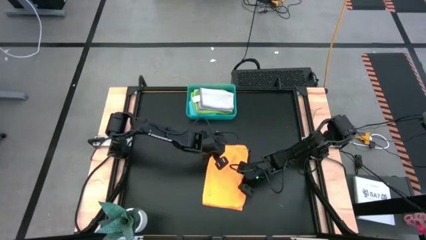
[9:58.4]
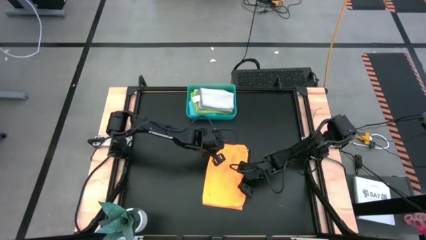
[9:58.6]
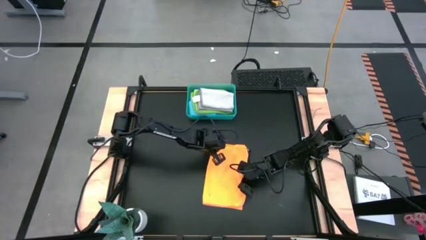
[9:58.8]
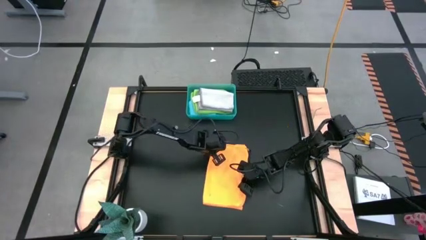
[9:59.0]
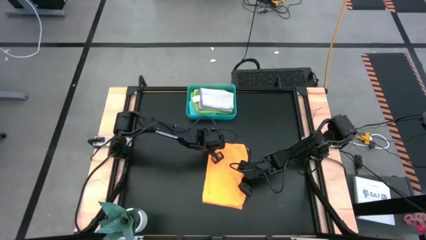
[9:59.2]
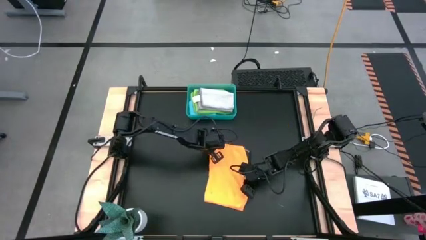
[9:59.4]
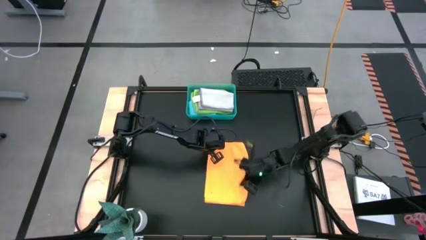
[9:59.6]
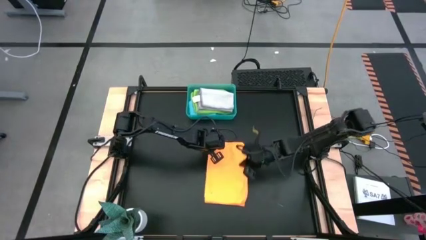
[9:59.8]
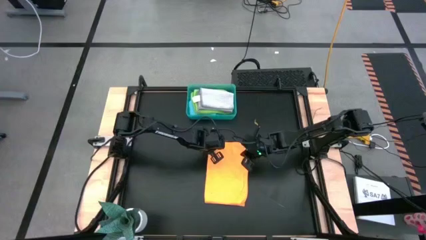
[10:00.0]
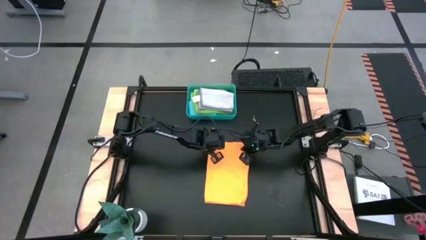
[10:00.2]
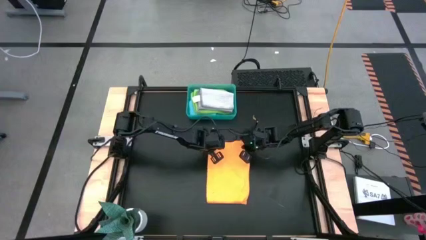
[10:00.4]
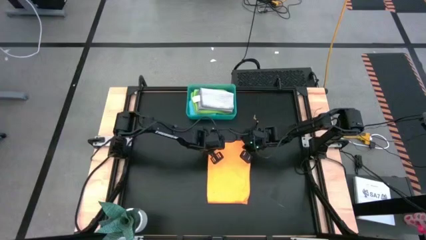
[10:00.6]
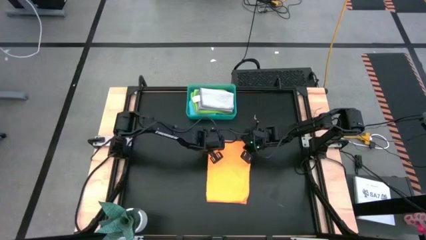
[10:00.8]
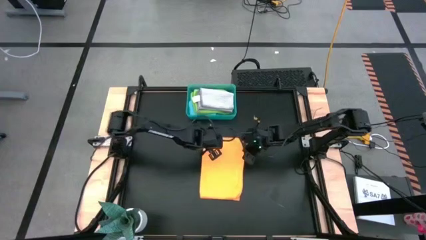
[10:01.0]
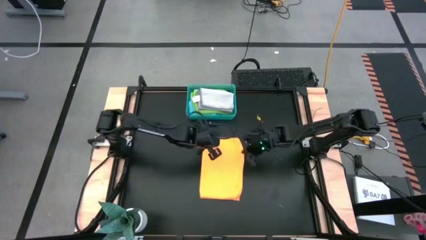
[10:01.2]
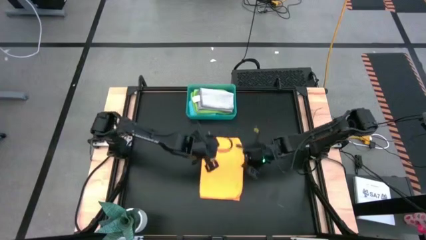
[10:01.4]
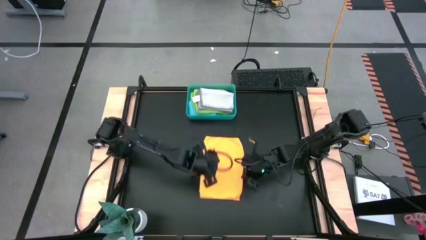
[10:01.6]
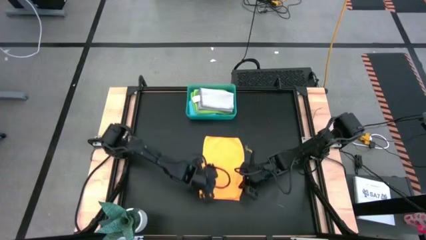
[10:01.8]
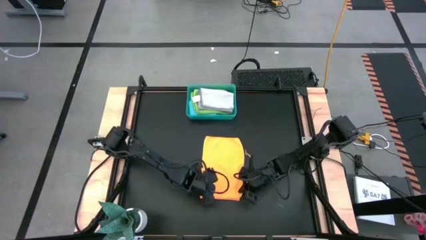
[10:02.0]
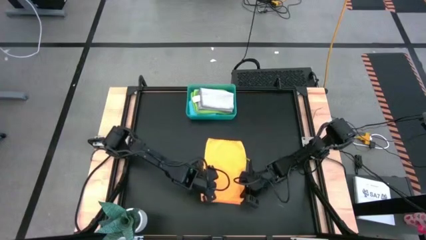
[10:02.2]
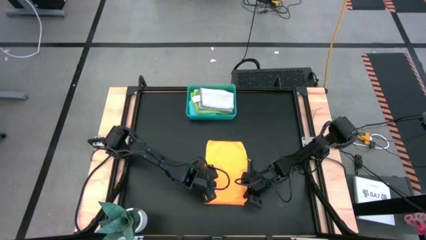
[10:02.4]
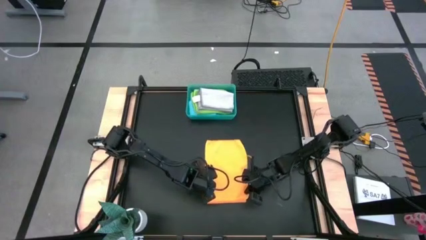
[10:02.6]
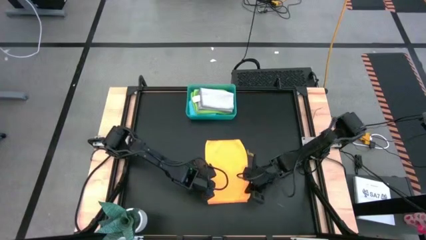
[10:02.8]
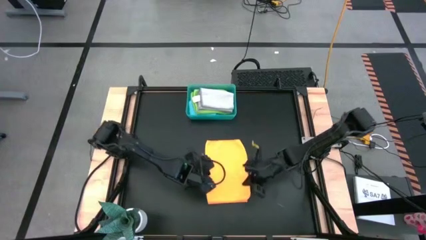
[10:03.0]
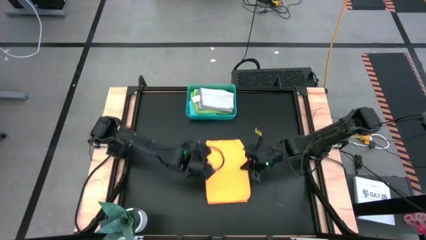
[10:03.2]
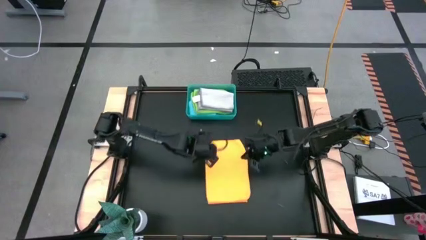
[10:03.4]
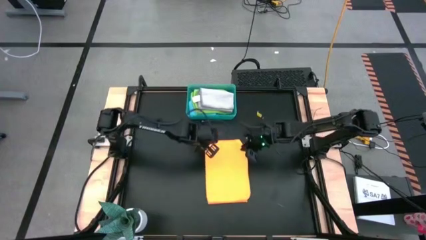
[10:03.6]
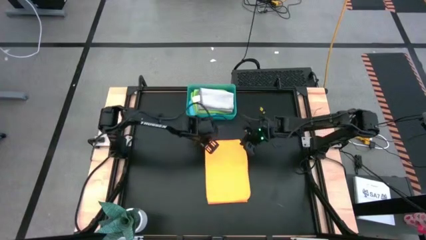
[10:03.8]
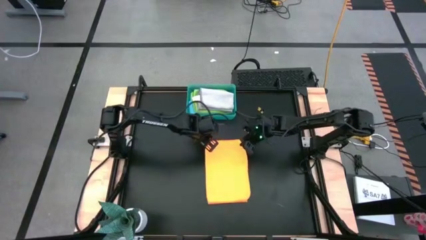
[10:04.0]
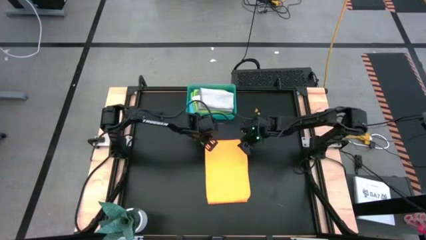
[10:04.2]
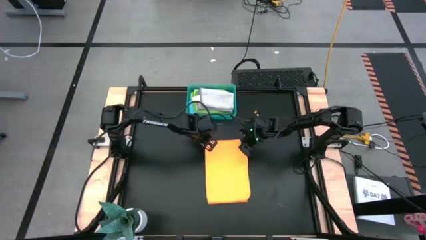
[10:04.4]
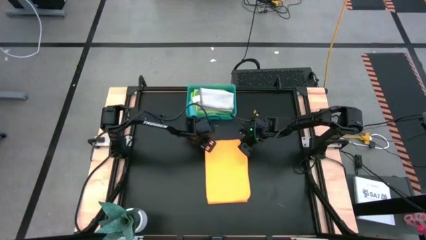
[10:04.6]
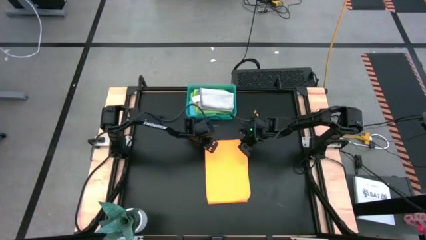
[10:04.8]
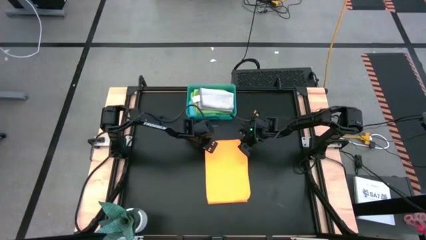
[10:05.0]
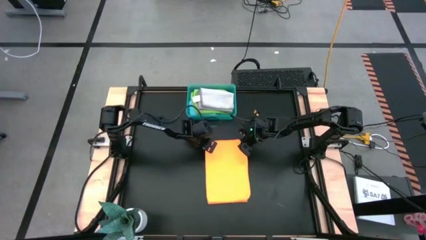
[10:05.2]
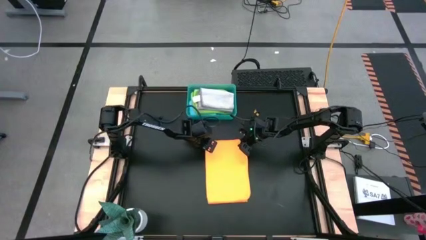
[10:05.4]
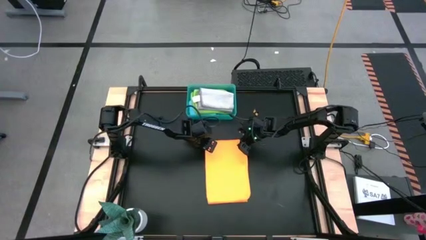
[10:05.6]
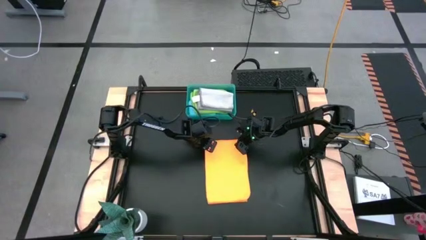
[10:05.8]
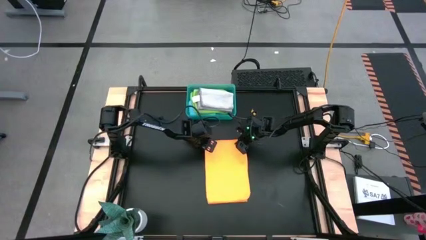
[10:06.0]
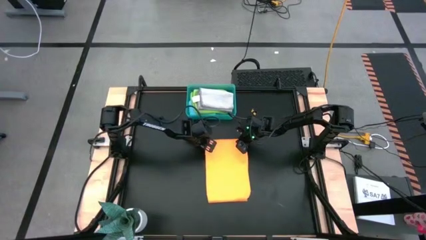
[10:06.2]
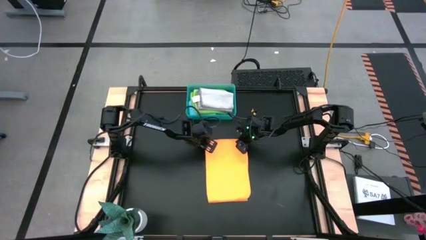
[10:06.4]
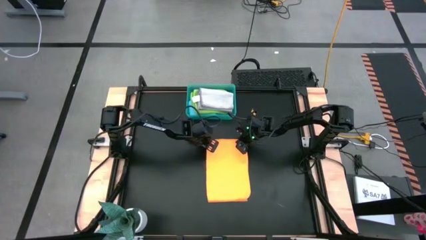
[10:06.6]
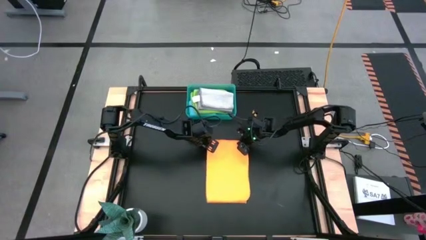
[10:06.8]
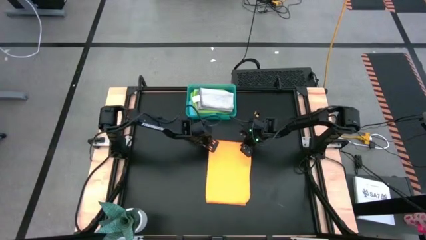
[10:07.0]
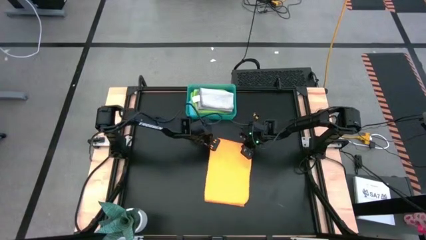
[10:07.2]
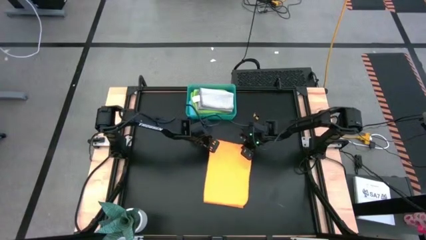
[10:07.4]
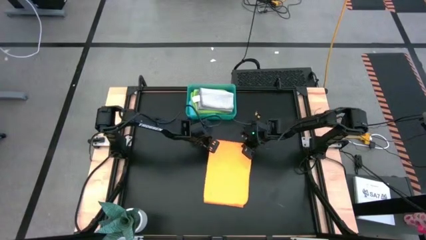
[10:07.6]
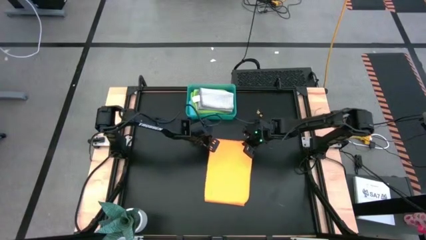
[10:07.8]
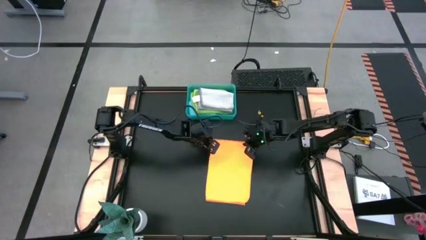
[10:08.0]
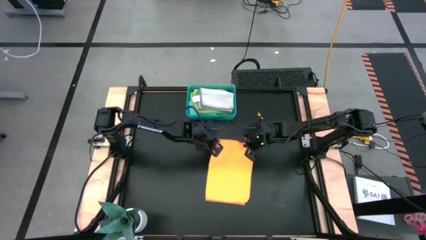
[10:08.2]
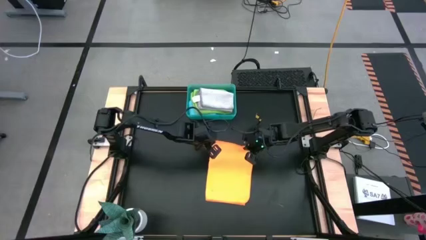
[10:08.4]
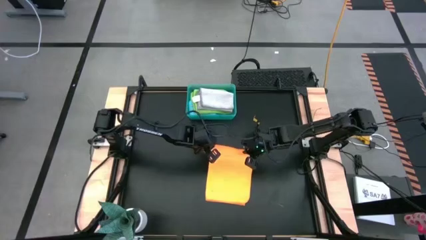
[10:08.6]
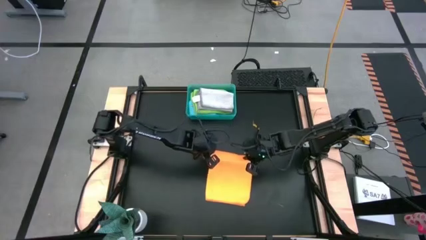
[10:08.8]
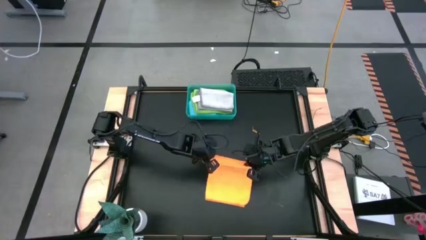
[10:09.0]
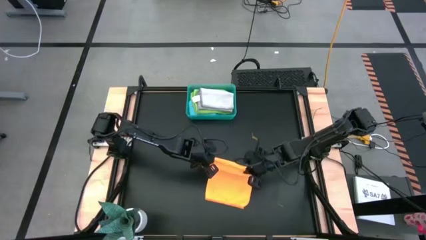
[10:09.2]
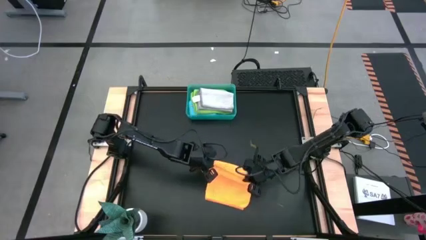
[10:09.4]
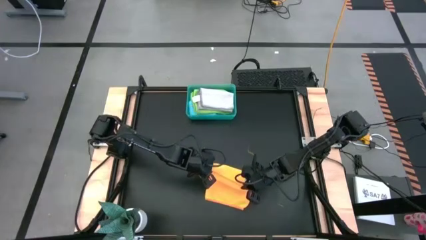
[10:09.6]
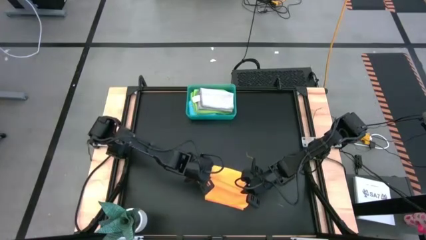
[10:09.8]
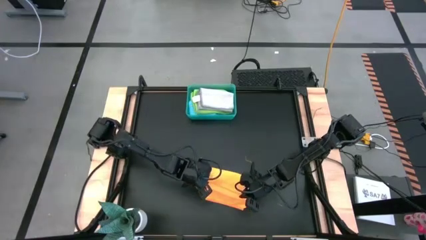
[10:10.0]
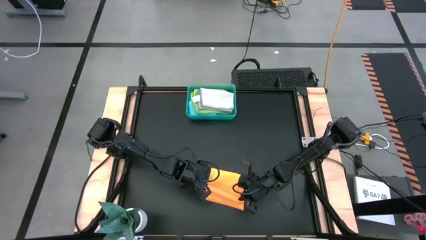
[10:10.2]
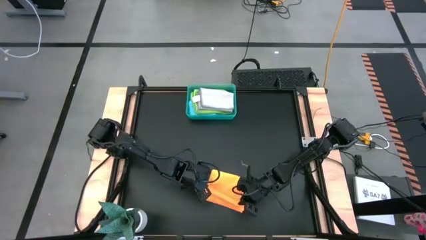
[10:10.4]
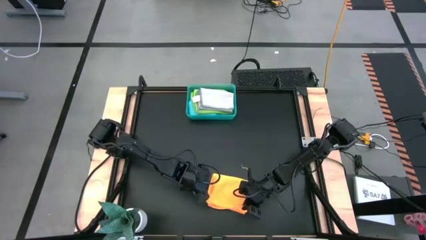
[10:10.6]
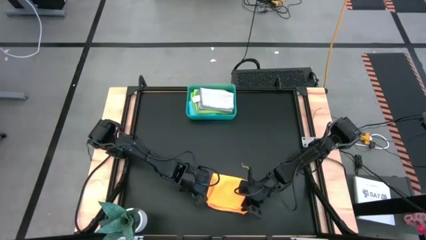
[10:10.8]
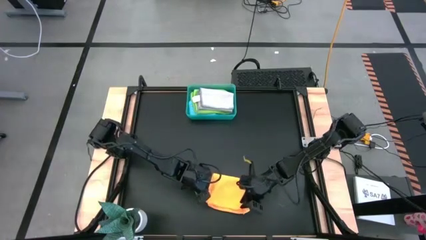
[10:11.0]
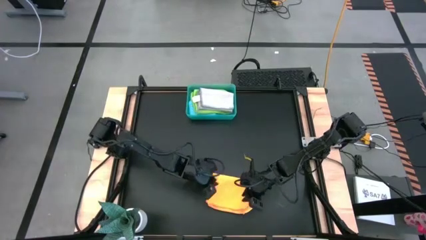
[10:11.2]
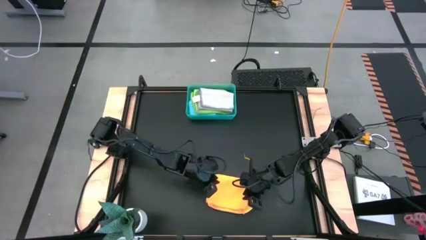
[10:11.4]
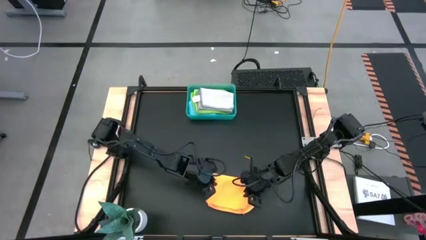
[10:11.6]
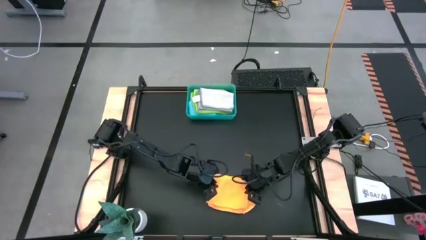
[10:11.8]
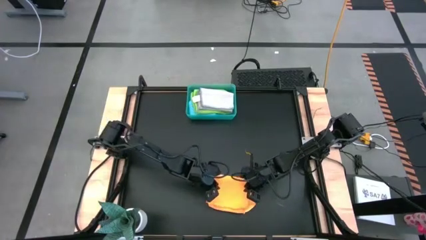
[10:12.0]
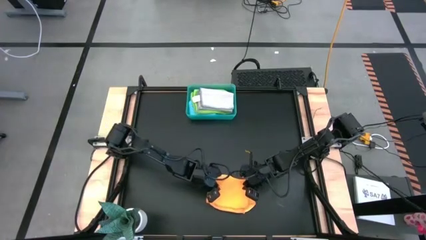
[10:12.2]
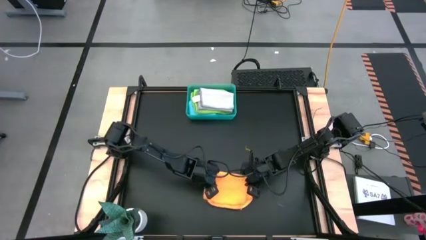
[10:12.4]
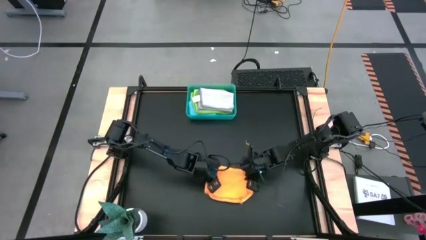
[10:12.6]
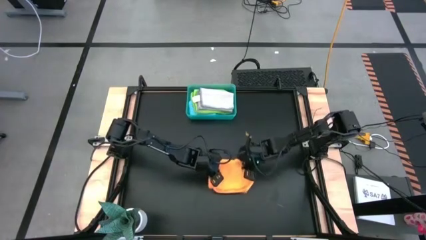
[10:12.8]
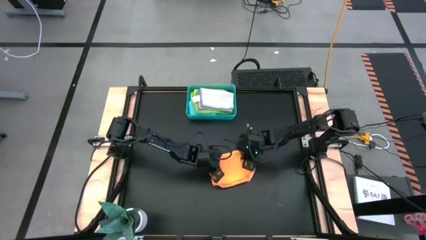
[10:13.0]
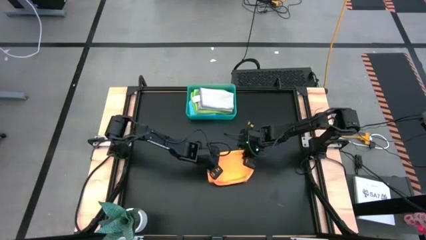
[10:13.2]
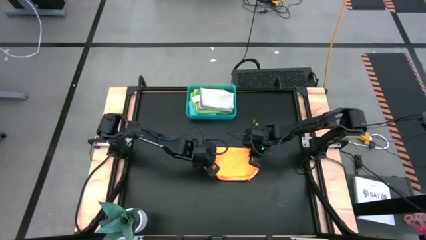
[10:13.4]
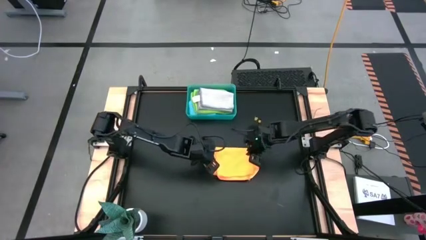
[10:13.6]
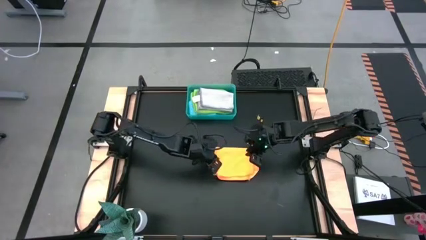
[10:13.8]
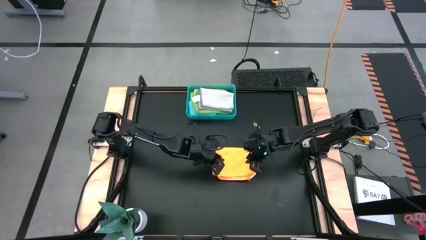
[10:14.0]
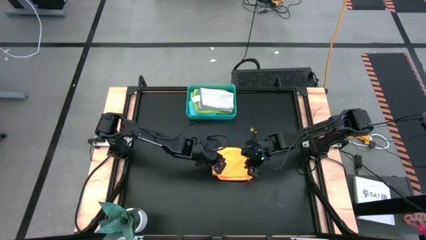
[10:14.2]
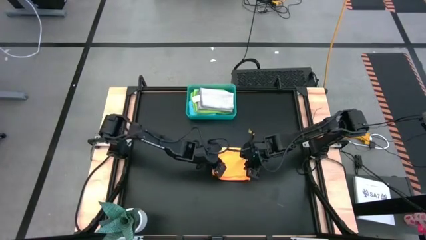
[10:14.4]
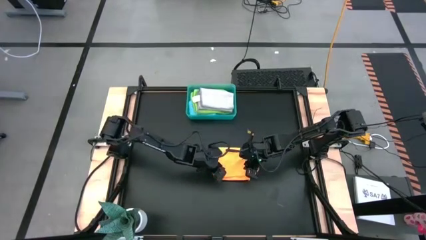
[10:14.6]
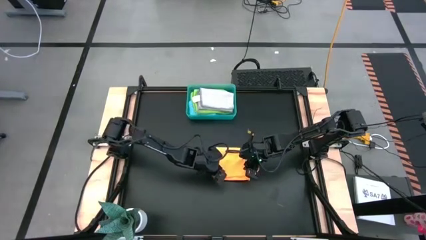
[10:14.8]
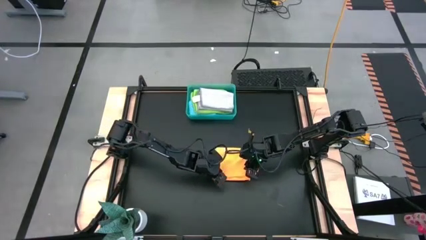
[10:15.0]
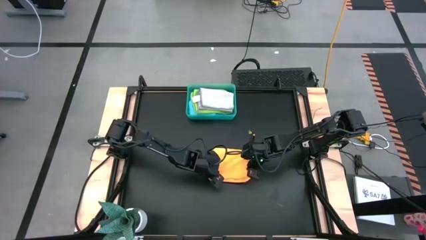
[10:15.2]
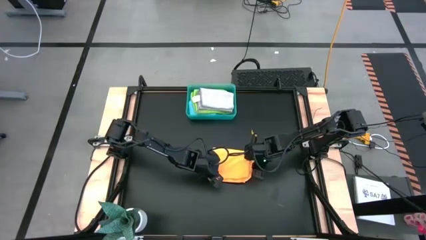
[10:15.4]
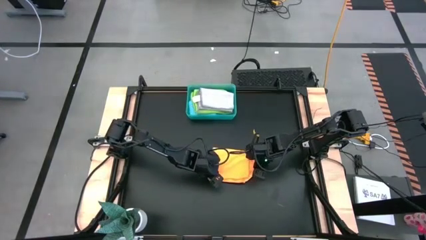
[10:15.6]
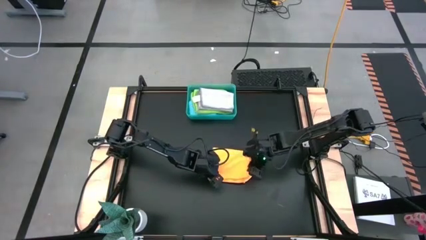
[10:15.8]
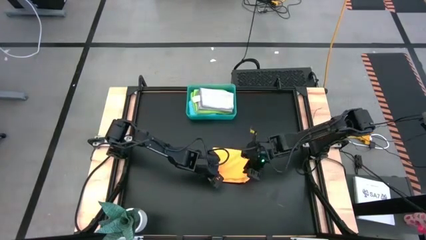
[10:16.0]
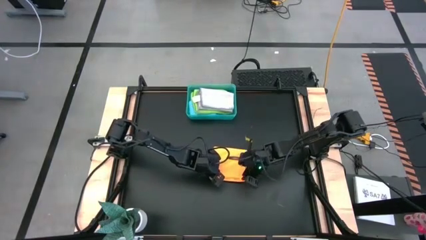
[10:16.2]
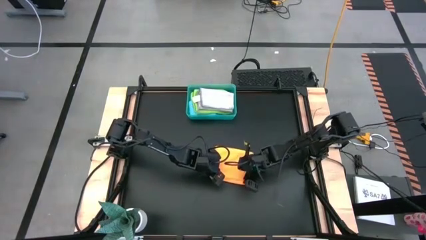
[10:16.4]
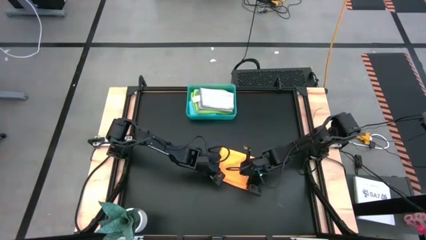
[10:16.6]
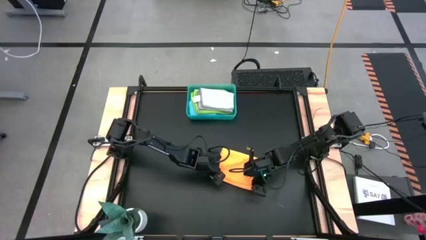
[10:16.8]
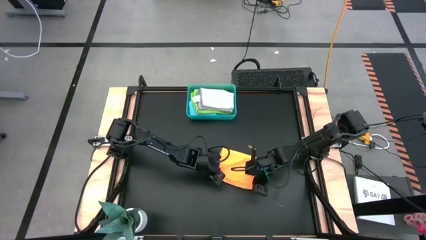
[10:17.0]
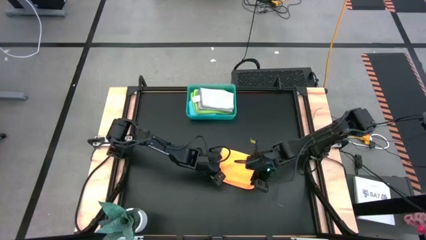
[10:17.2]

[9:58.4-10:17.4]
Task: Fold microfiber towels
Fold the orange microfiber towel
